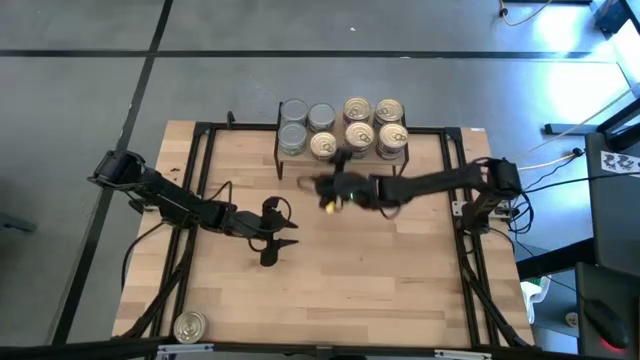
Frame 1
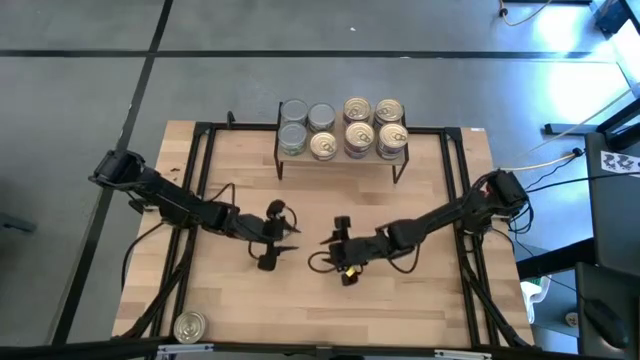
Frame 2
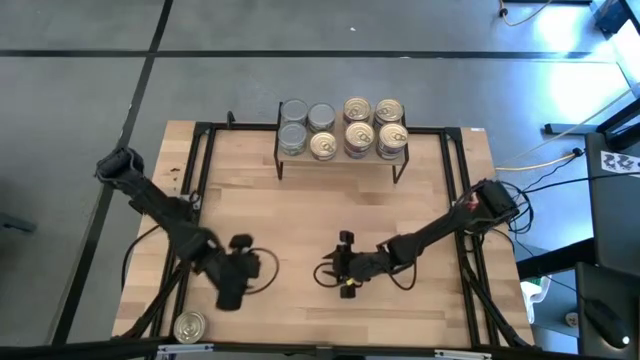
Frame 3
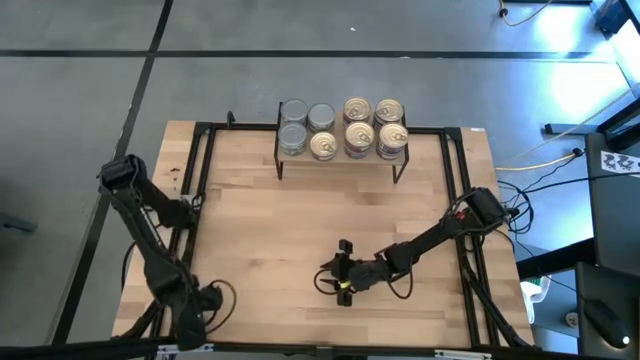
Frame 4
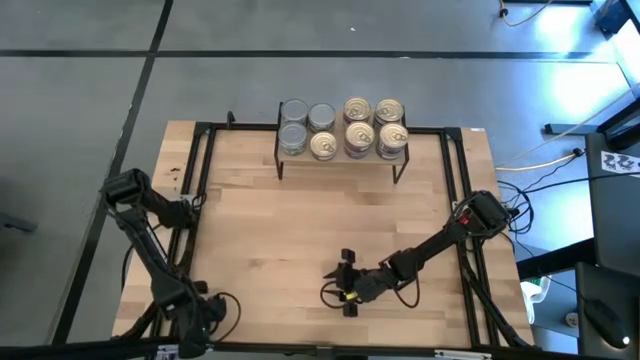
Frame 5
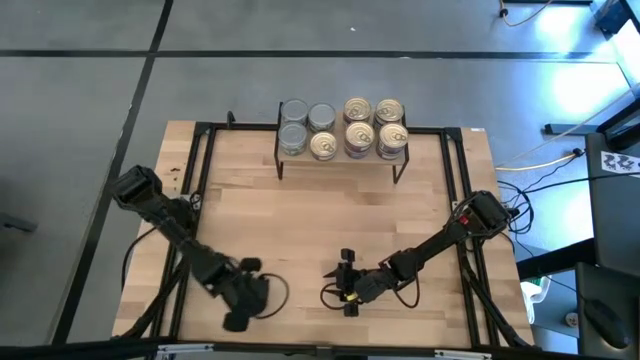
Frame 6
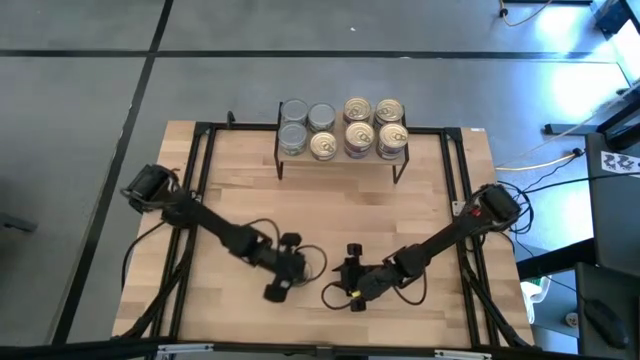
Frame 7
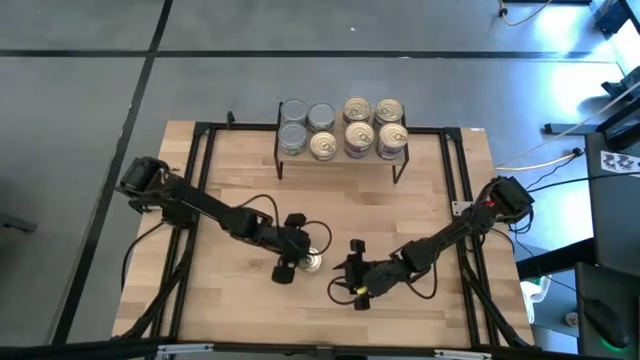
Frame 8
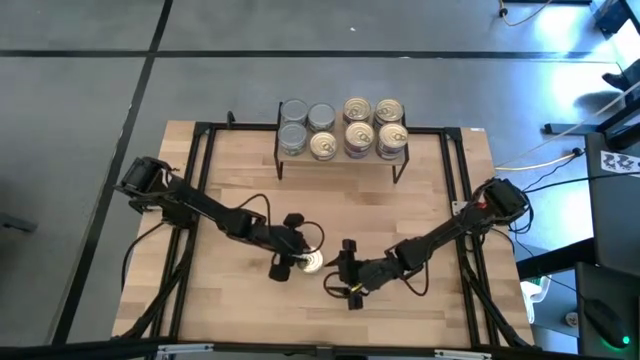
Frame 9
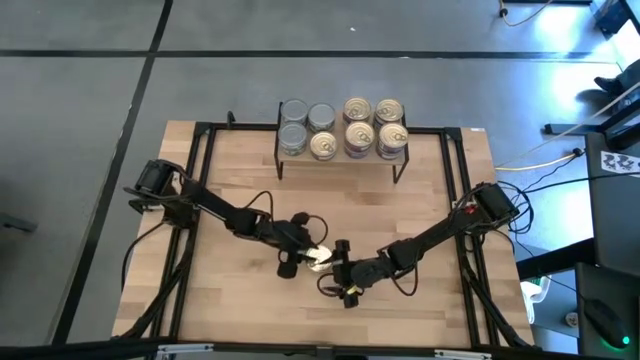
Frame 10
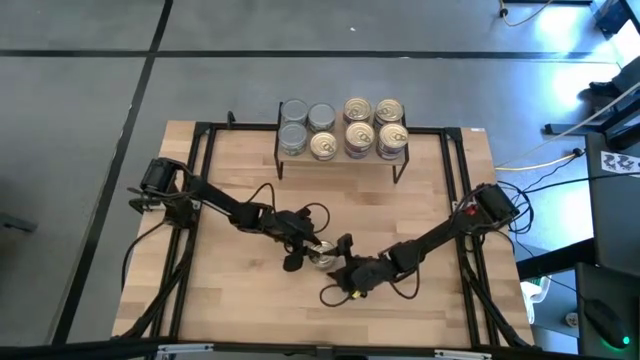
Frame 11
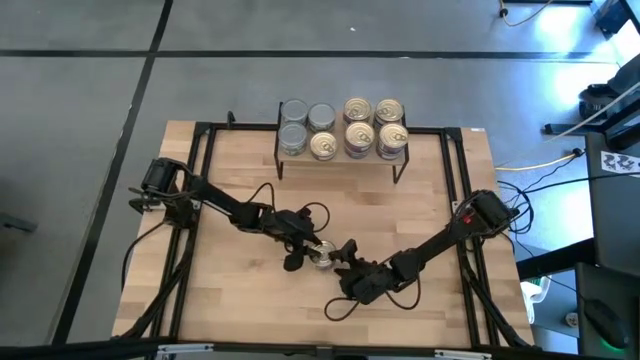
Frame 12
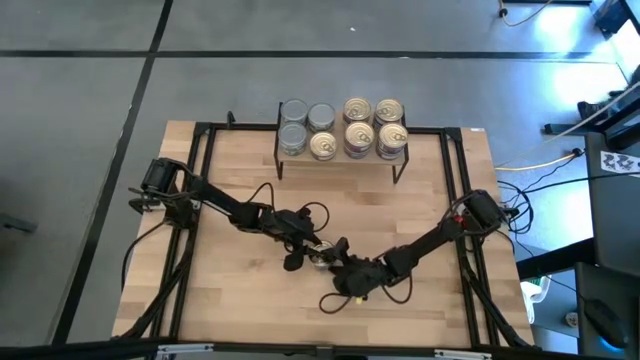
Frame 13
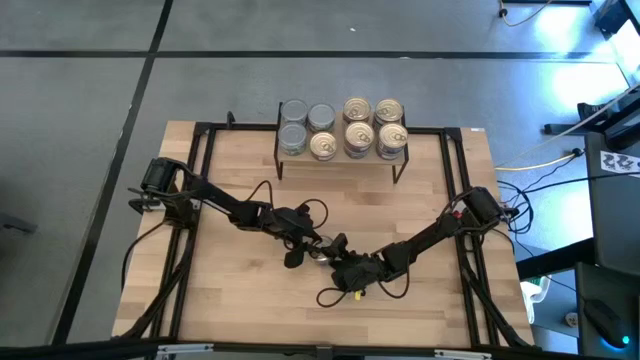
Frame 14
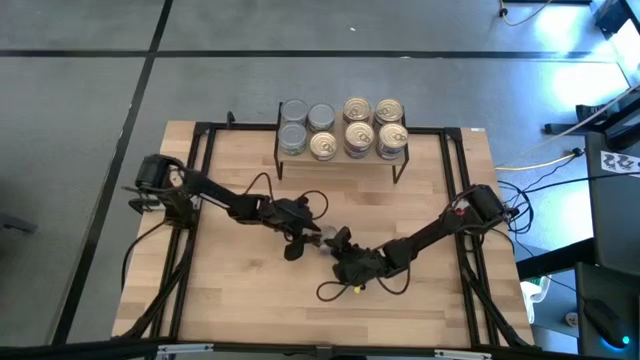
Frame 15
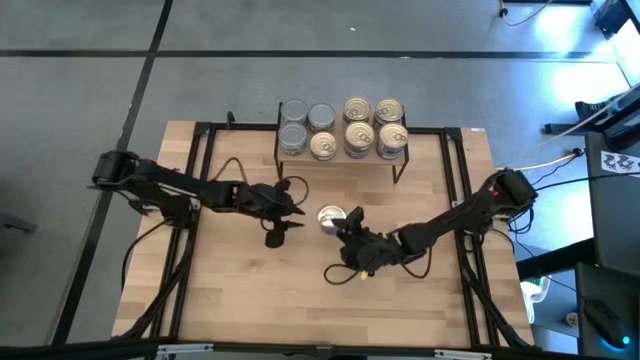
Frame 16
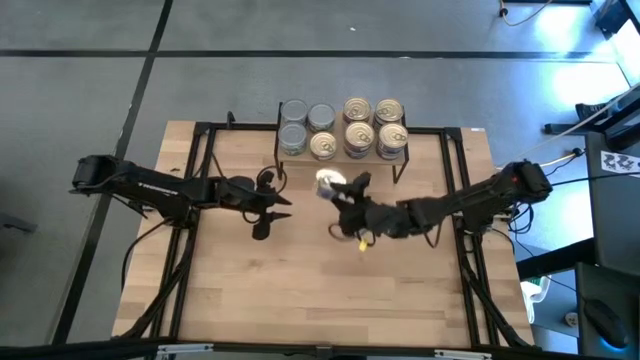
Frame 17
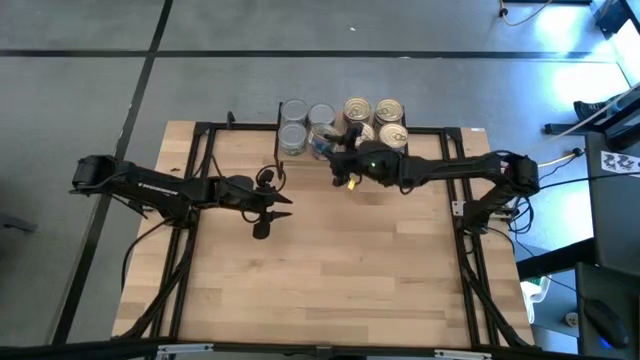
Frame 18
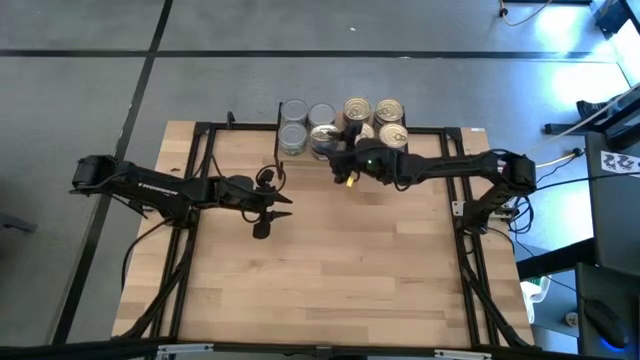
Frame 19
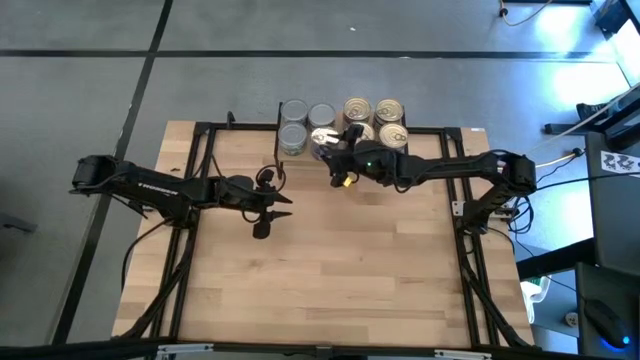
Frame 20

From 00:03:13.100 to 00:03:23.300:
Task: Stack canned seafood by type on shelf
Stack the blue pink tuna can on top of the blue pink tuna can on the shelf

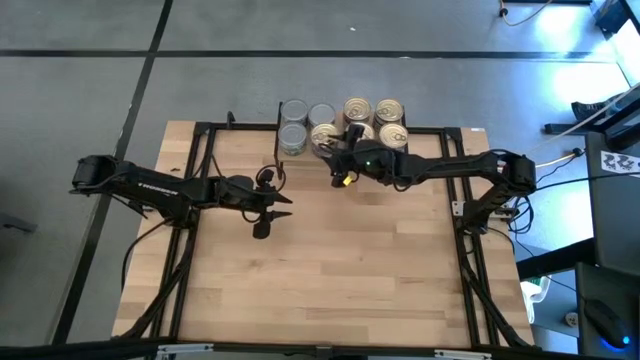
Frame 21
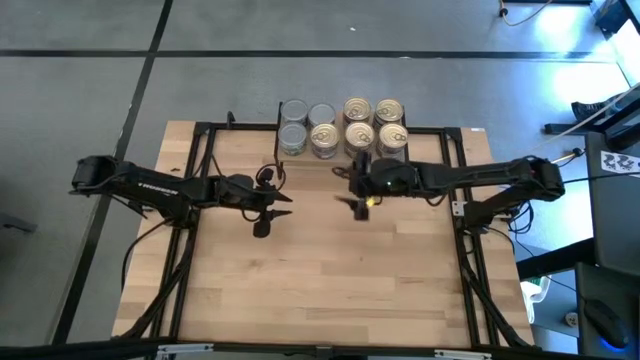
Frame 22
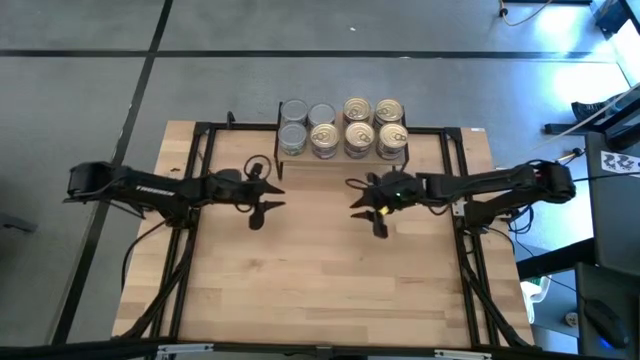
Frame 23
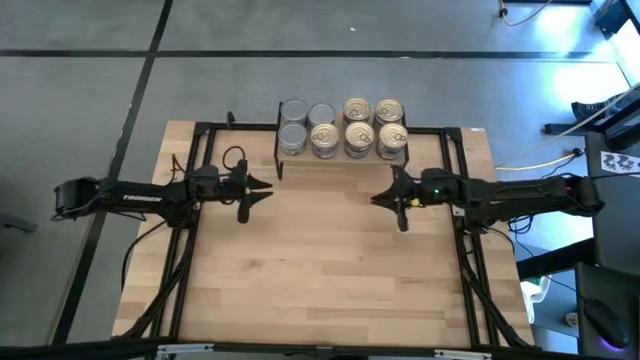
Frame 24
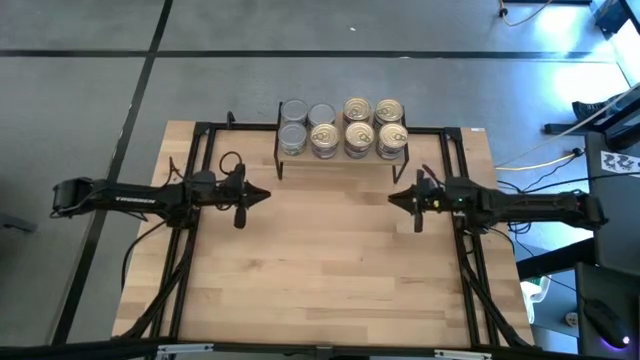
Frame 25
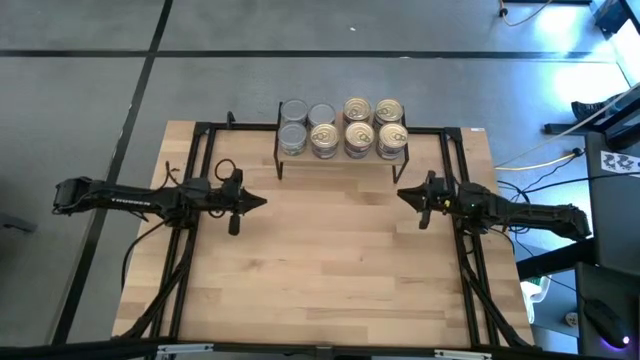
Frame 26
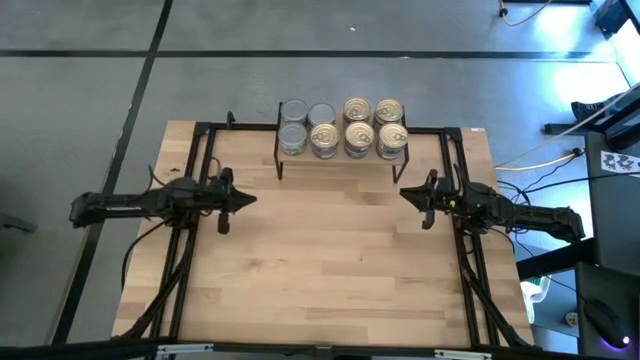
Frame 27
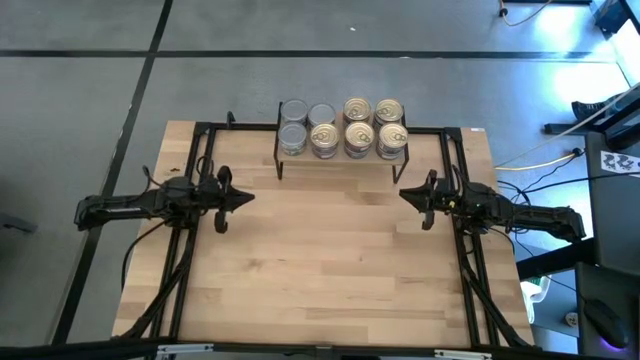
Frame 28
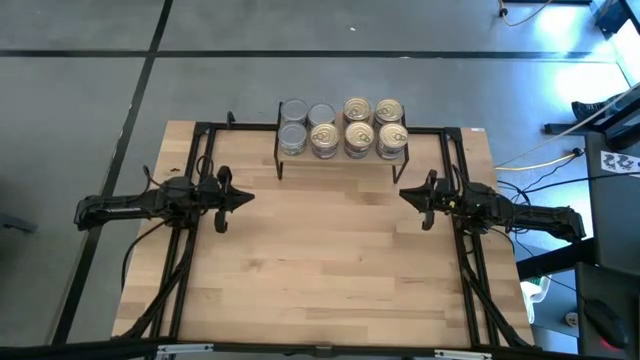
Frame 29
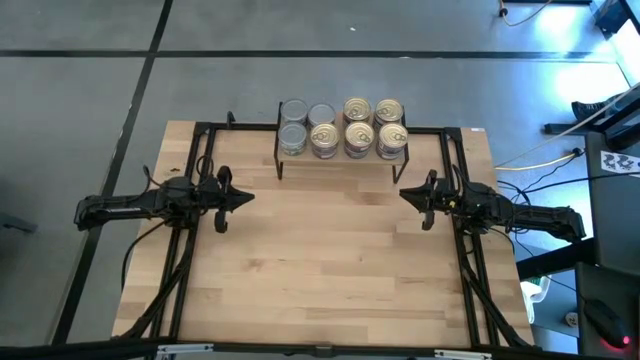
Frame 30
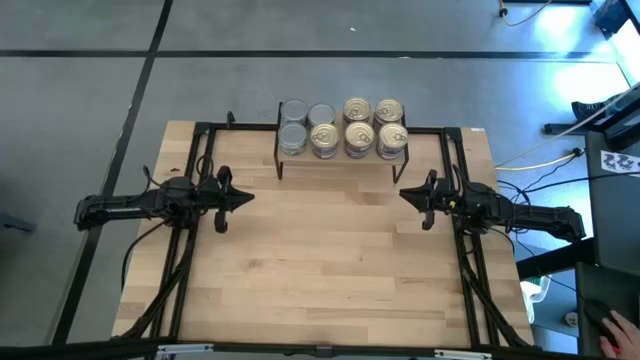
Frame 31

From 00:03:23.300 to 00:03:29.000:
Return to Home Position

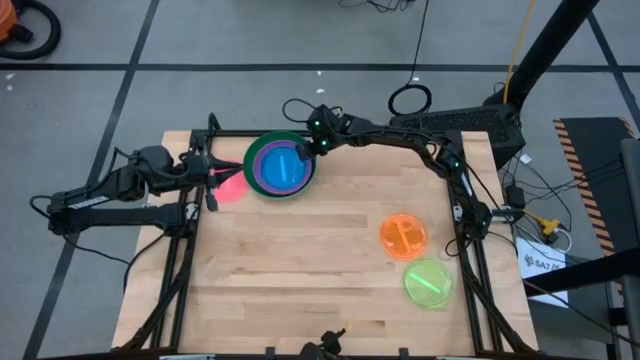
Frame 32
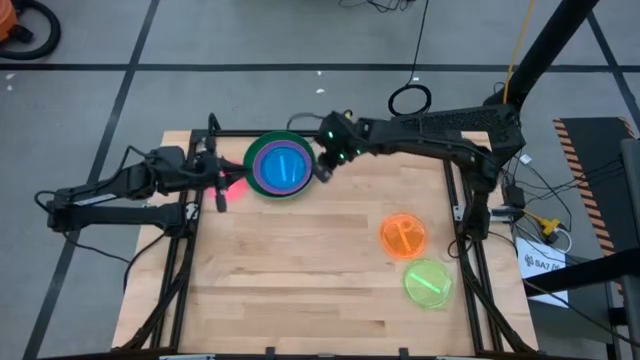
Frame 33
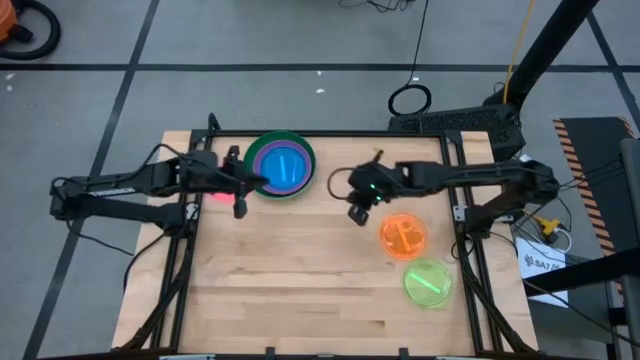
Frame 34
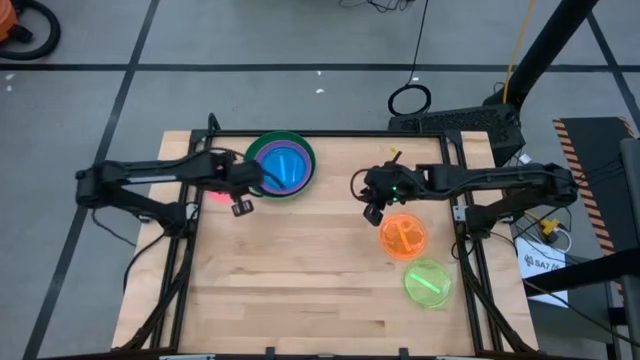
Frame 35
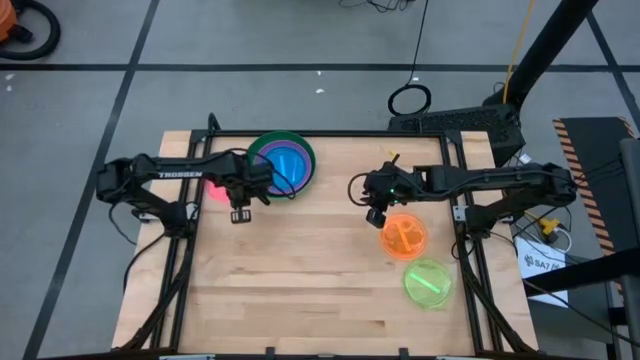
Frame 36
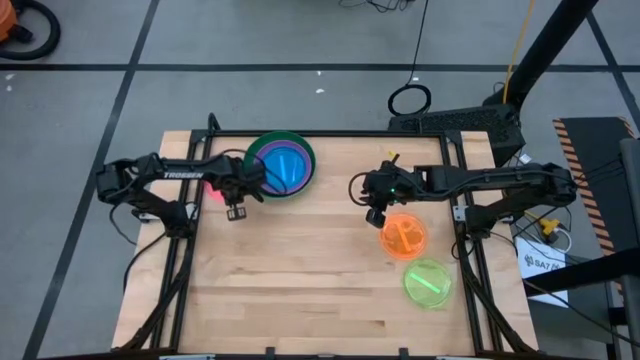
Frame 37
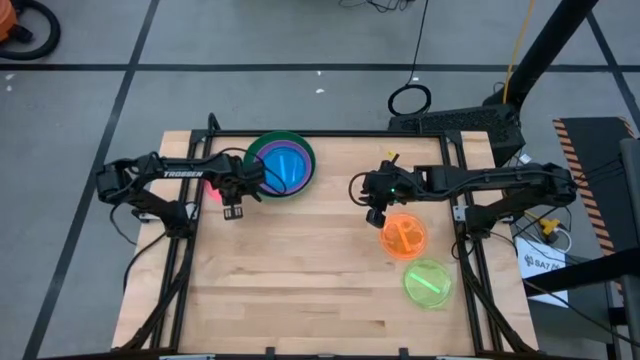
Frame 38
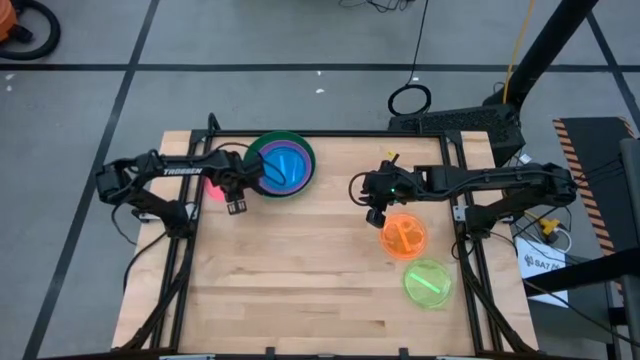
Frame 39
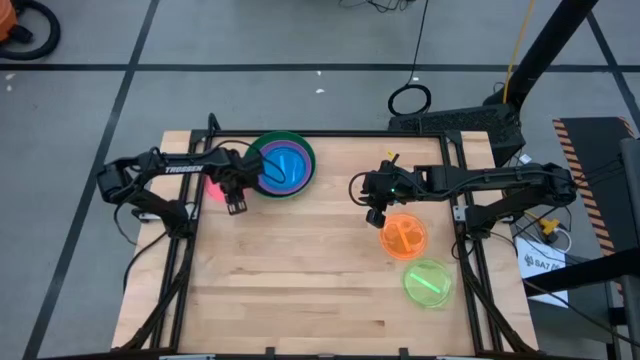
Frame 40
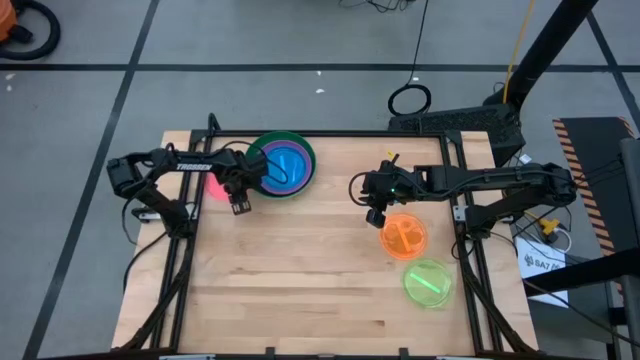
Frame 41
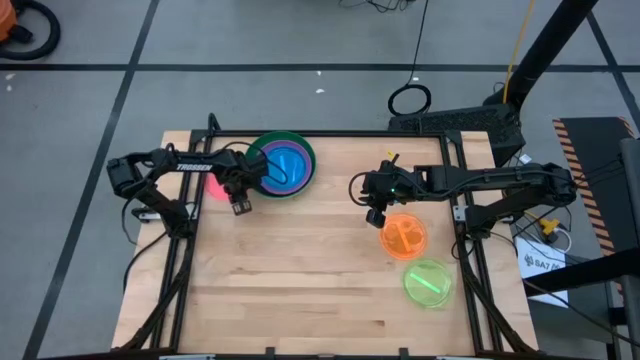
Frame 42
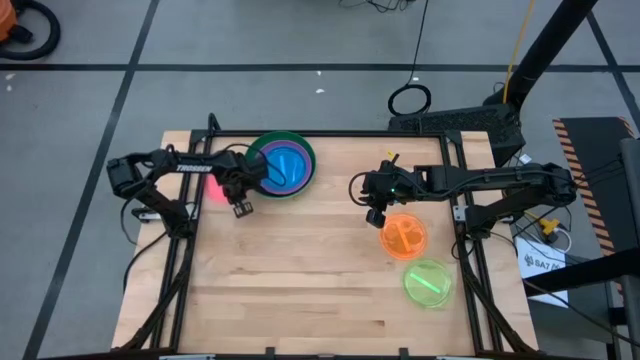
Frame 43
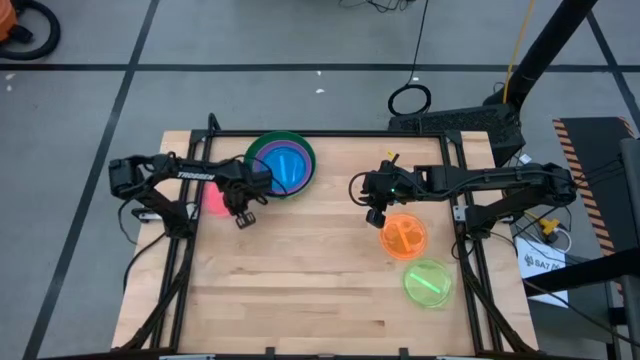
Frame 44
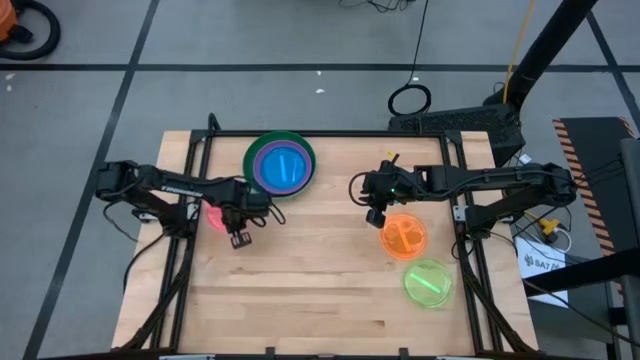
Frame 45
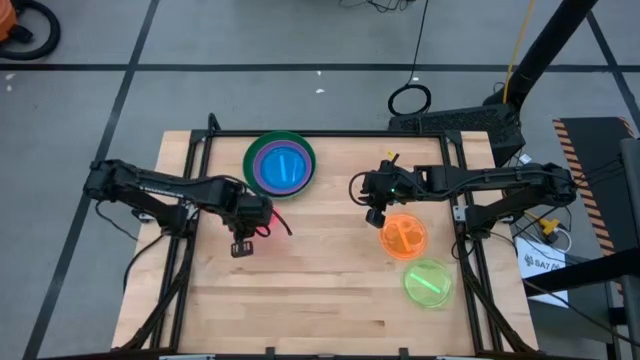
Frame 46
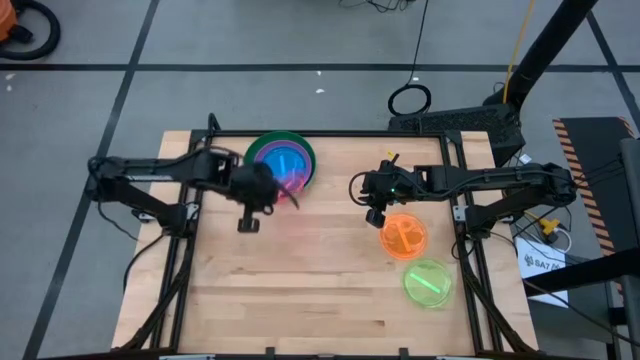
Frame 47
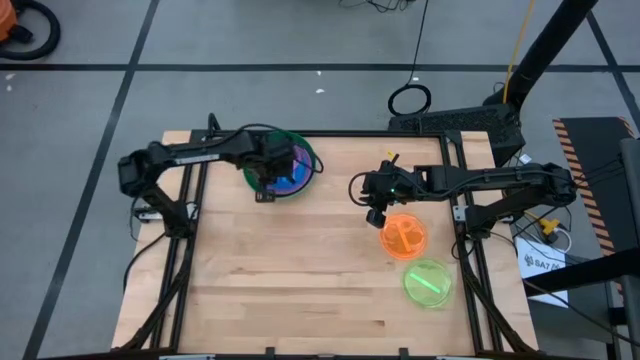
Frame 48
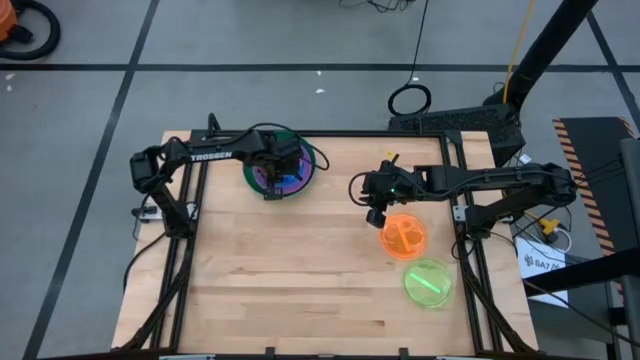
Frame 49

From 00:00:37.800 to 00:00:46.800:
Task: Stack plastic plates
Stack the pink plate on top of the blue plate
